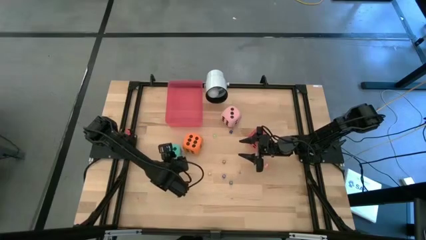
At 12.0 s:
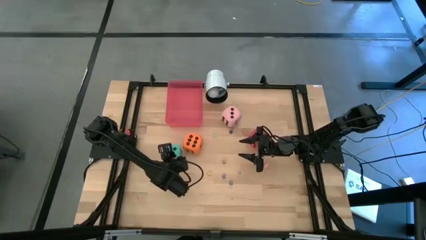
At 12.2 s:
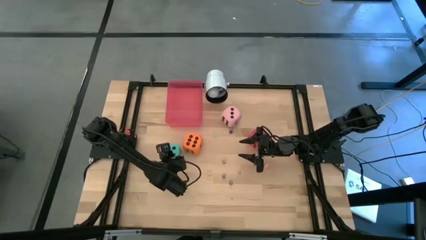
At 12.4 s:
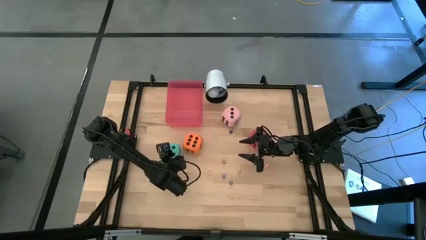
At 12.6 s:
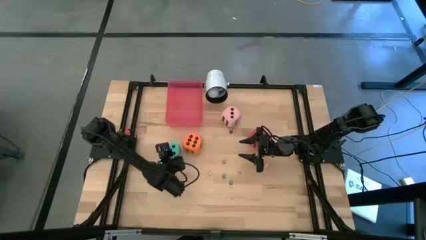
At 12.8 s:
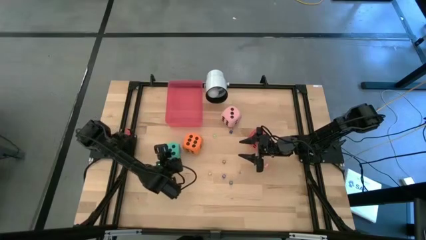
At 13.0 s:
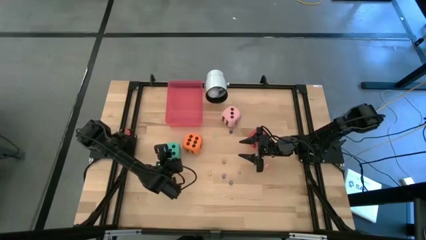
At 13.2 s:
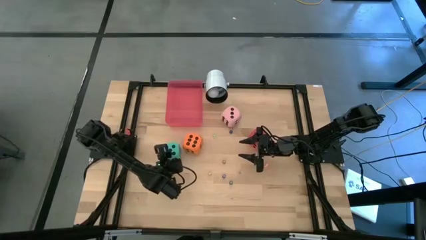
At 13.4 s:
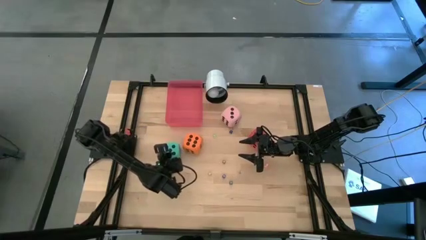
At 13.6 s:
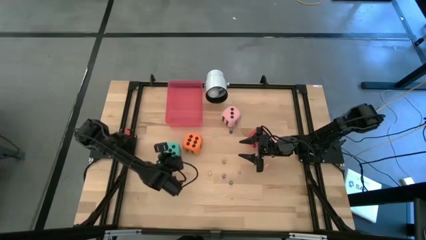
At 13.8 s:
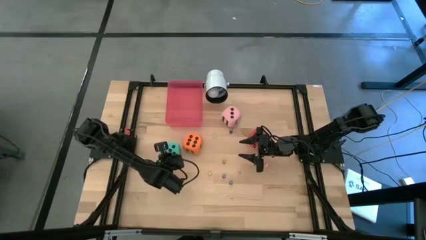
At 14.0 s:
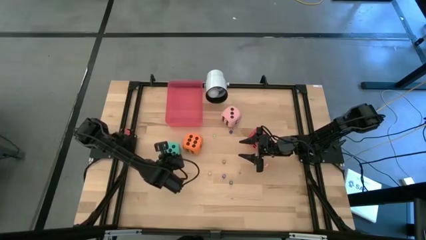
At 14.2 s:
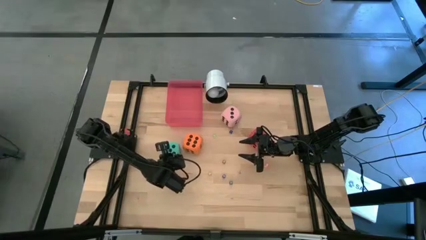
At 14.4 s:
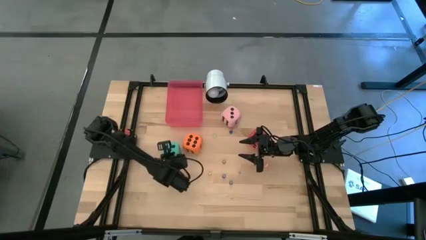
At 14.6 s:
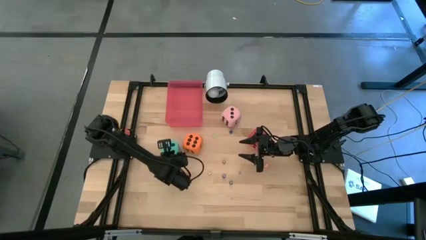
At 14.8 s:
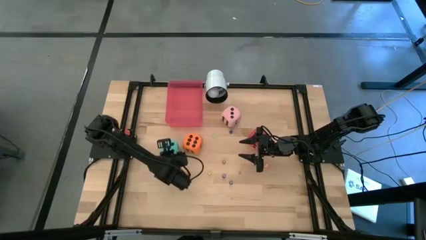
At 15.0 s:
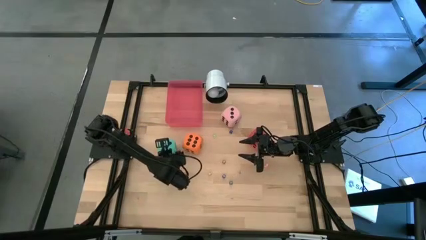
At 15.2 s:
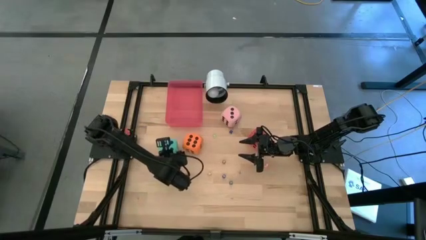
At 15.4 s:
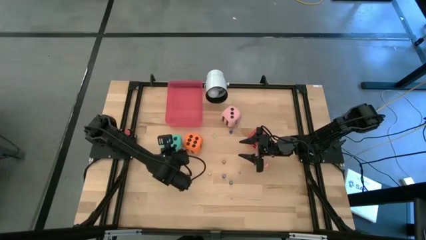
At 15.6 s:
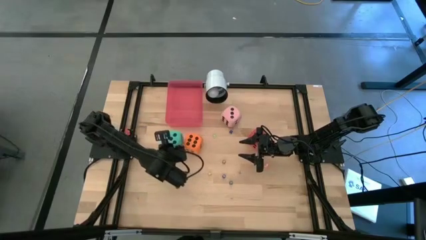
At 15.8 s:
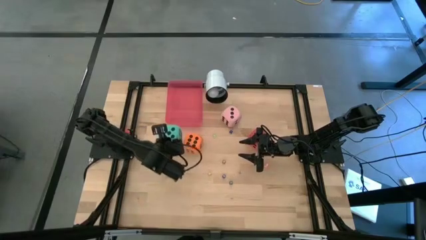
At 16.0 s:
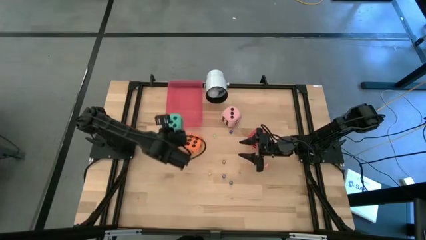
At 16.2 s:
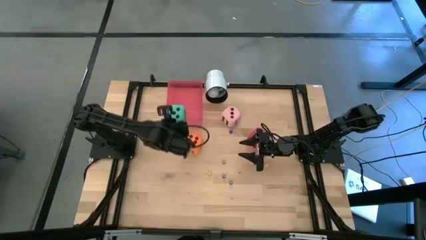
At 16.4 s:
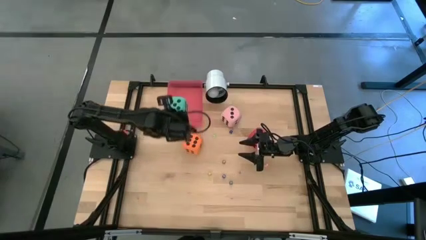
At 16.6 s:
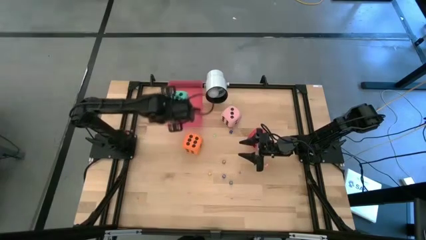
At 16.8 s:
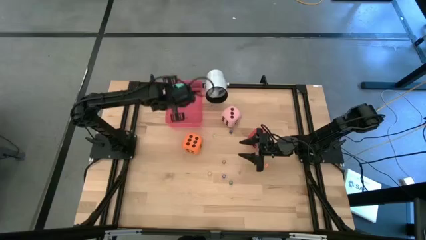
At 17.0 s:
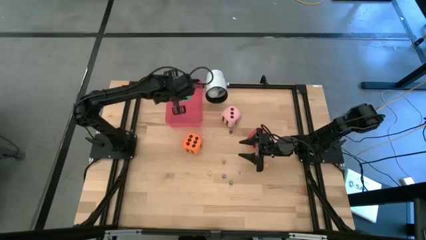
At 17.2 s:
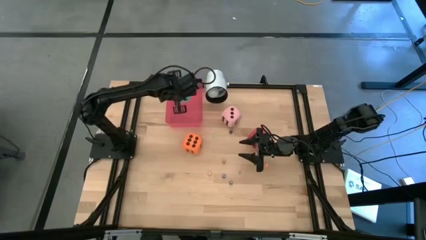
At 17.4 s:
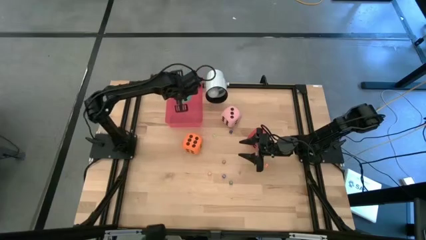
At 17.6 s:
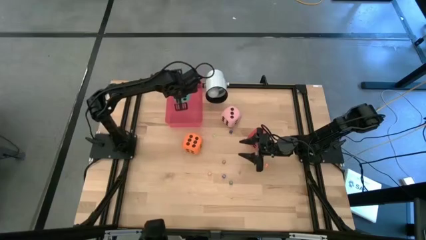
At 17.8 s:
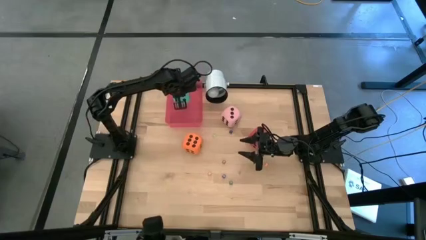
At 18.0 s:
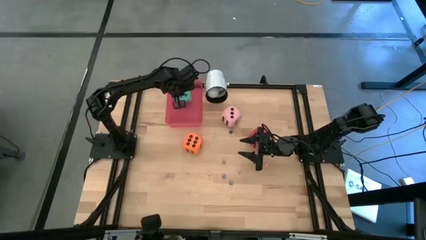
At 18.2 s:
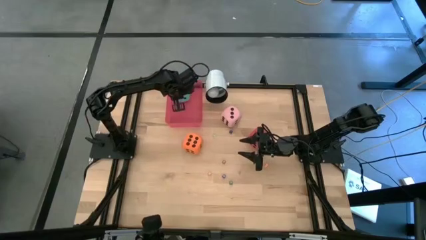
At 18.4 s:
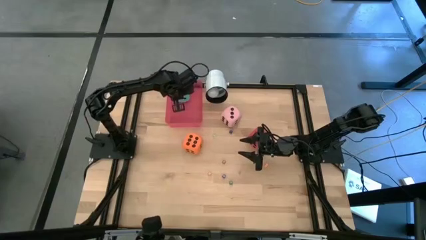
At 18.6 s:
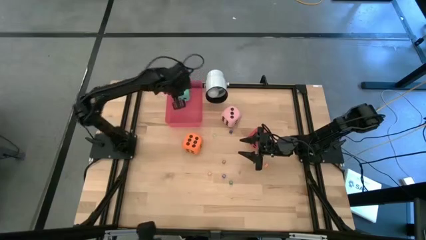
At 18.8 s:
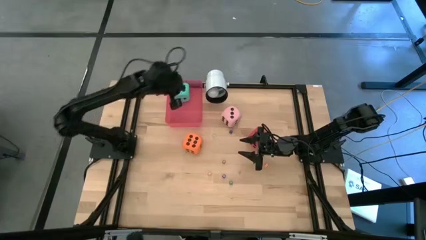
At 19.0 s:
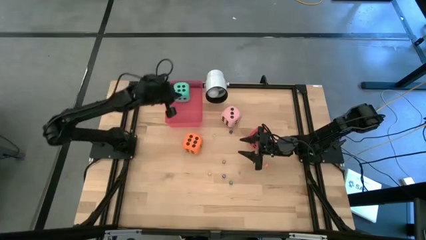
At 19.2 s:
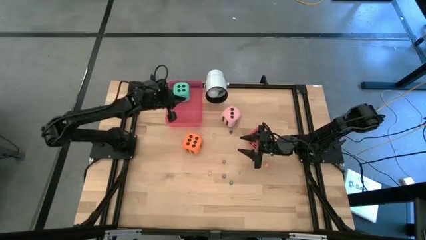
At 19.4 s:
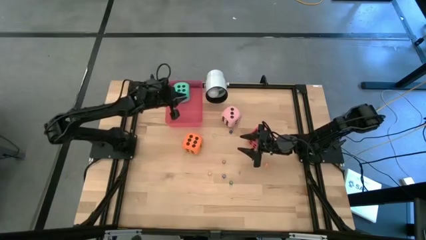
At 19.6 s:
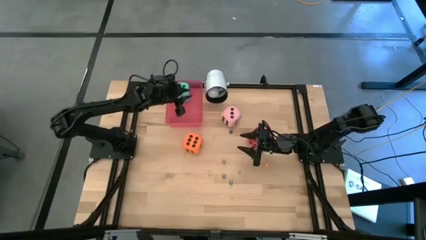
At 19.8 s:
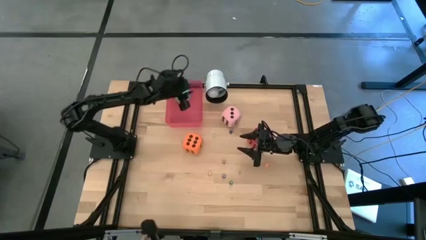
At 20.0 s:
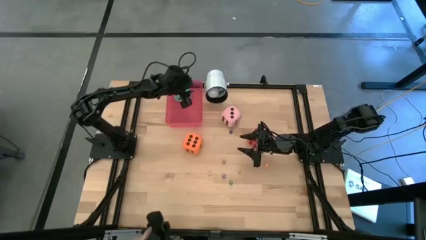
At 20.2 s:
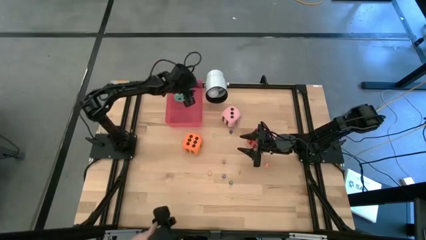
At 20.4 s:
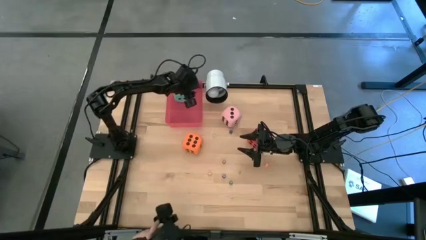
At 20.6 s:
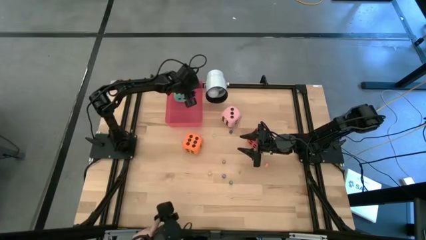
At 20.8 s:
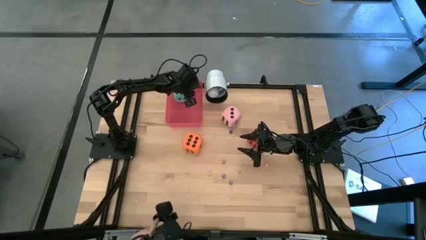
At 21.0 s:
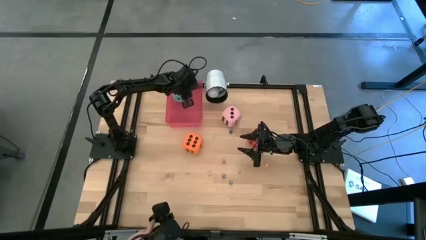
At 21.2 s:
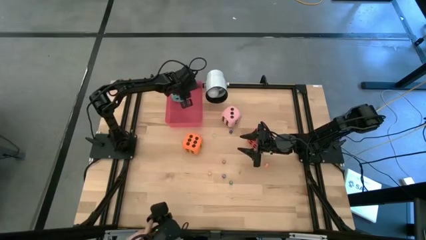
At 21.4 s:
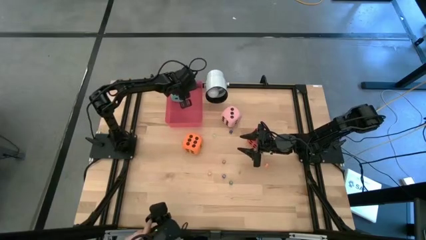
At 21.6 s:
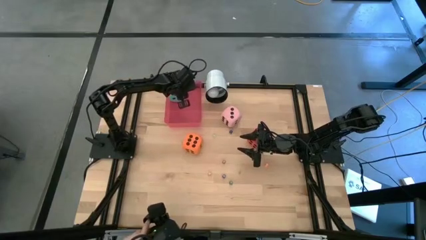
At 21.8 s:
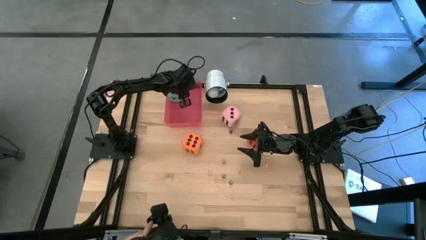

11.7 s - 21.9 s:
Task: Pick & Place Dice
Put the big light blue dice into the red bin
